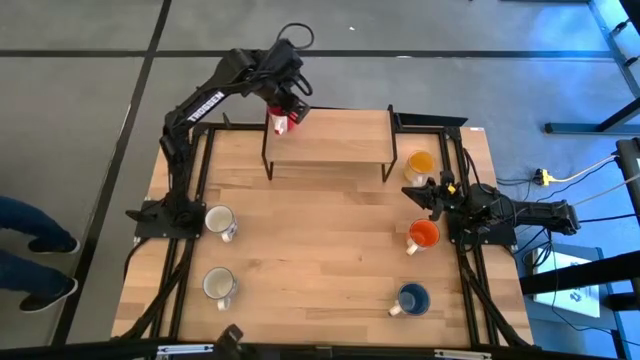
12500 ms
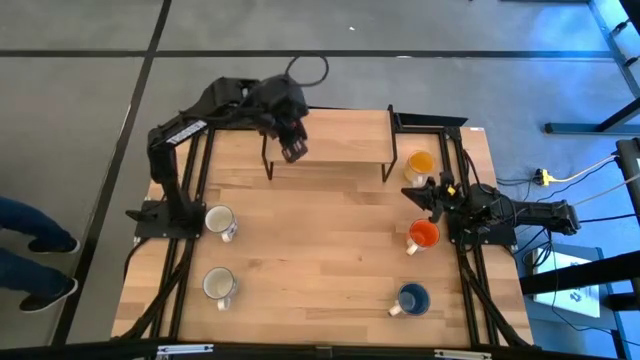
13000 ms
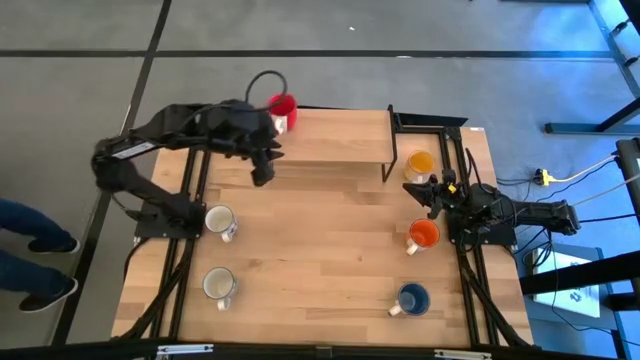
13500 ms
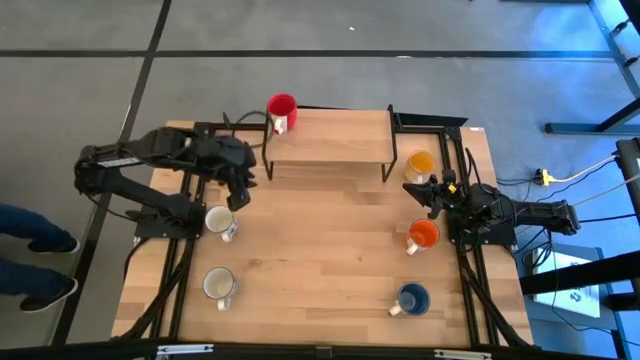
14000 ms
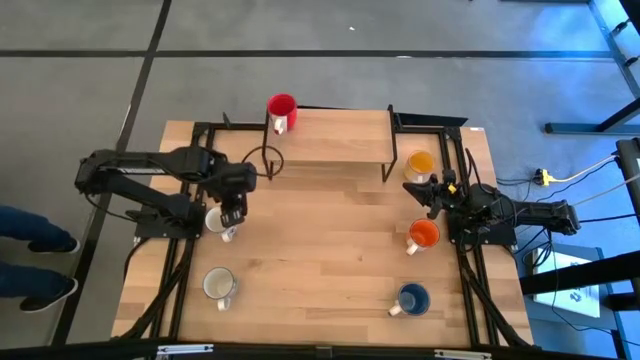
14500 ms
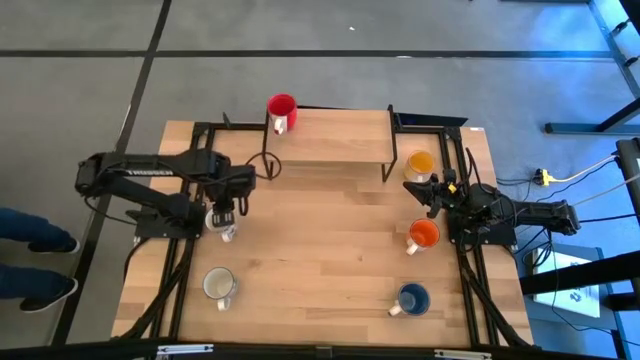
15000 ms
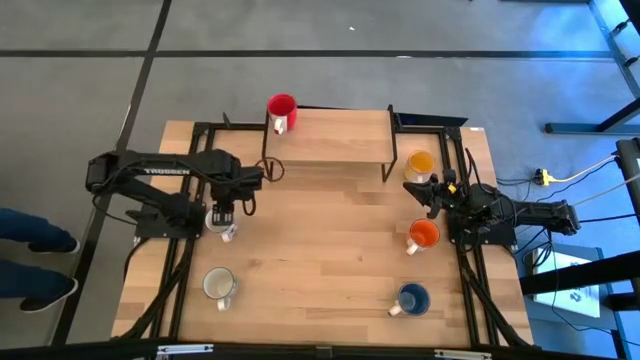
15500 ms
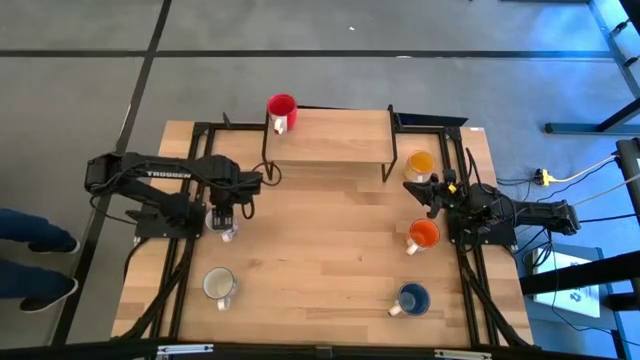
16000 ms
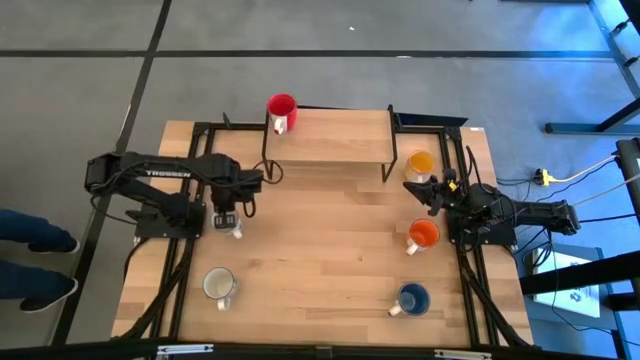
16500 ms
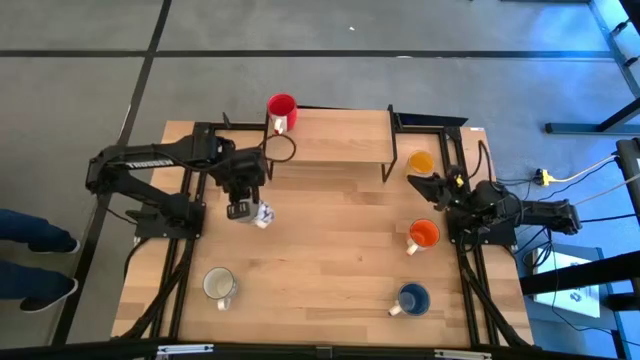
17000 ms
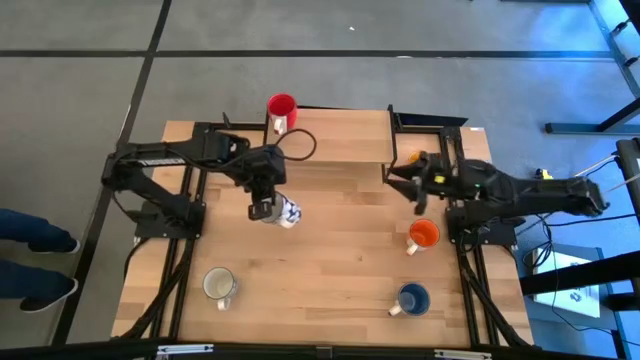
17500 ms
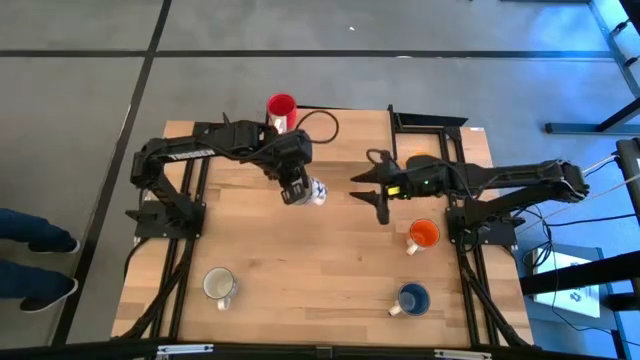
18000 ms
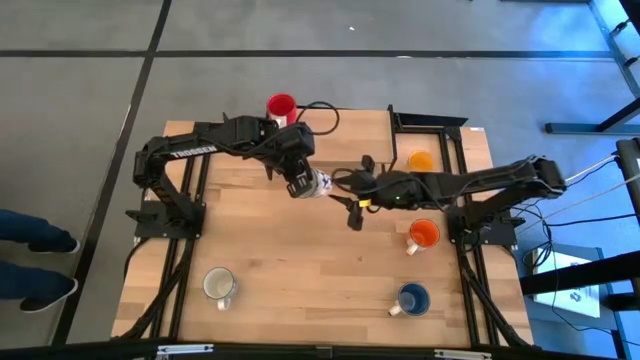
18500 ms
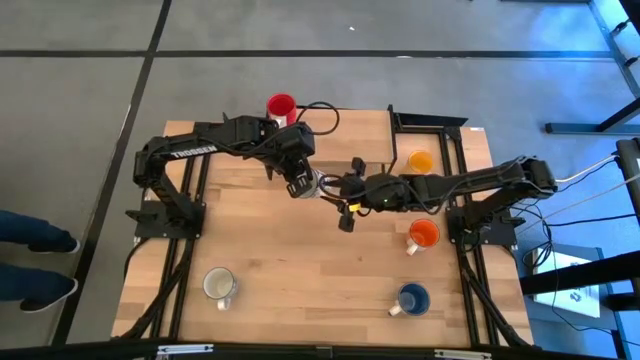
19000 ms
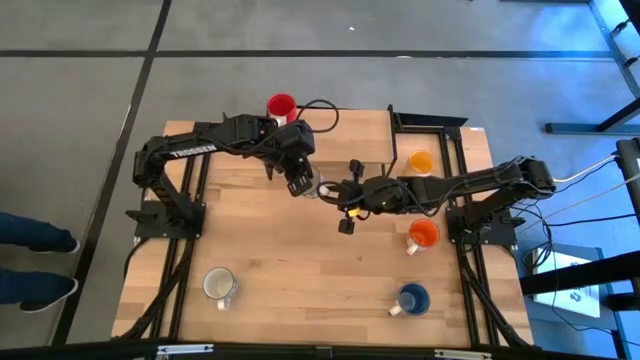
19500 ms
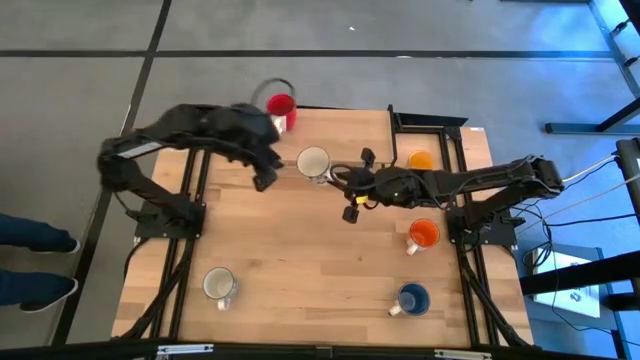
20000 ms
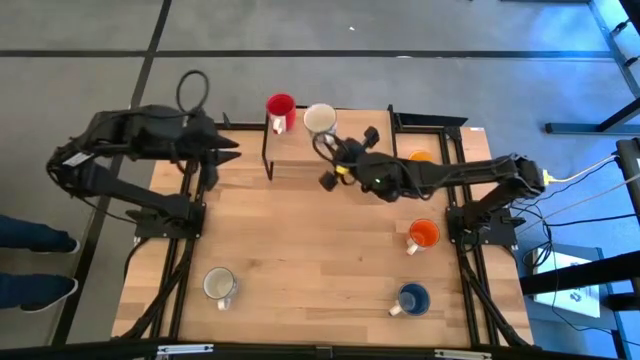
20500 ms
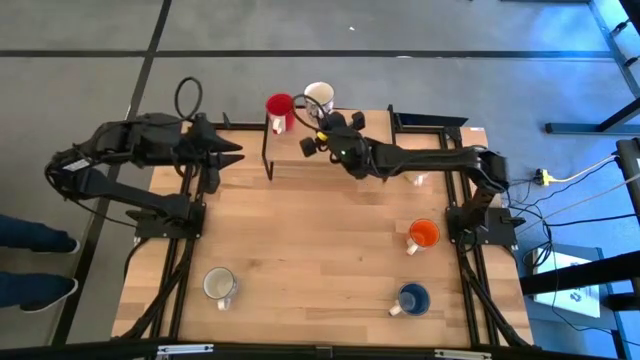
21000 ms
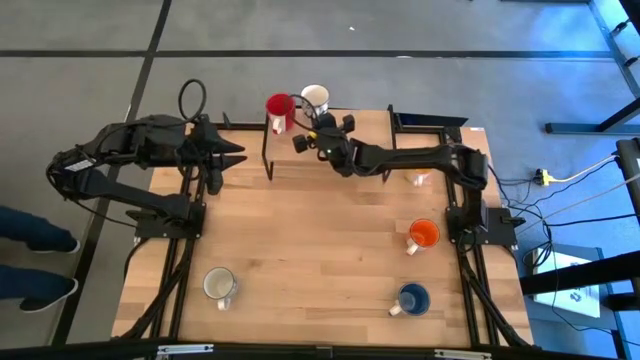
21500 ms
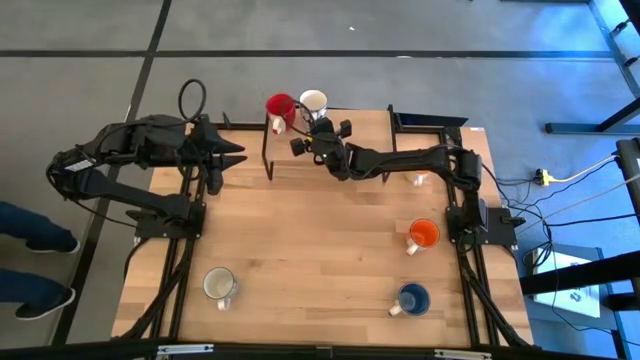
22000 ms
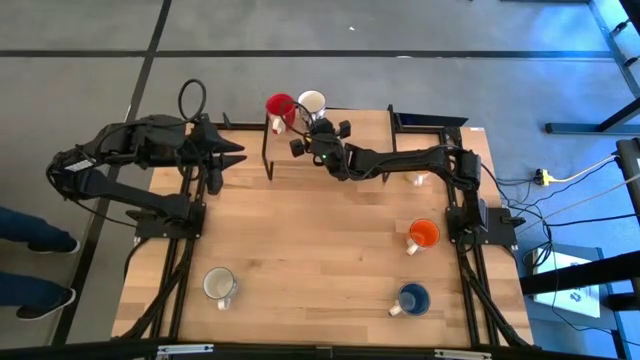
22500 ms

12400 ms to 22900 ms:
Task: Place coffee mugs
Put the top blue cup on the shelf

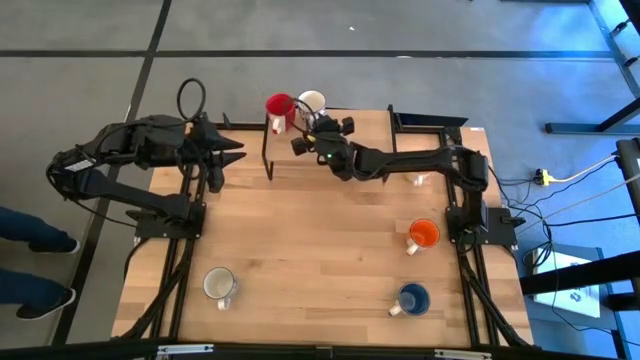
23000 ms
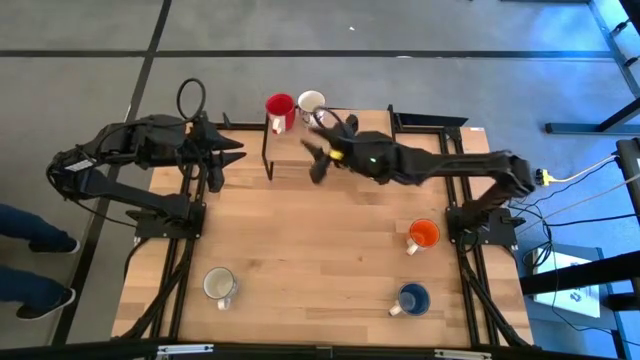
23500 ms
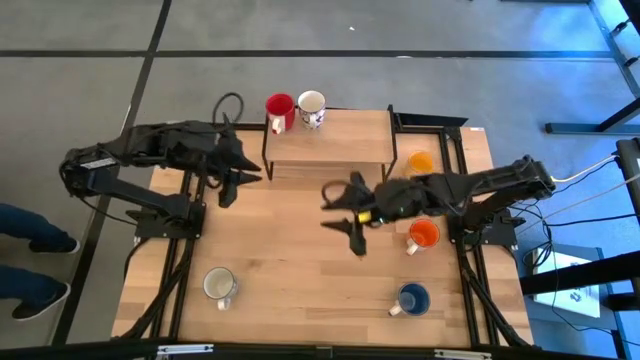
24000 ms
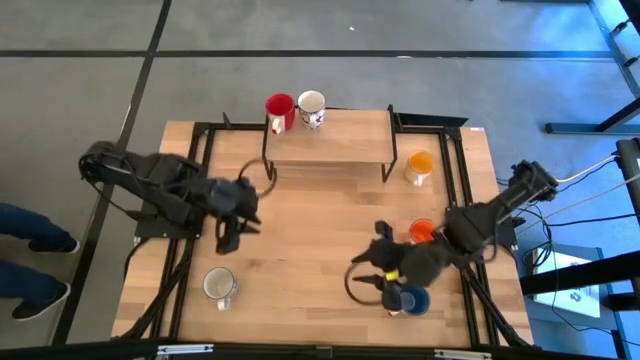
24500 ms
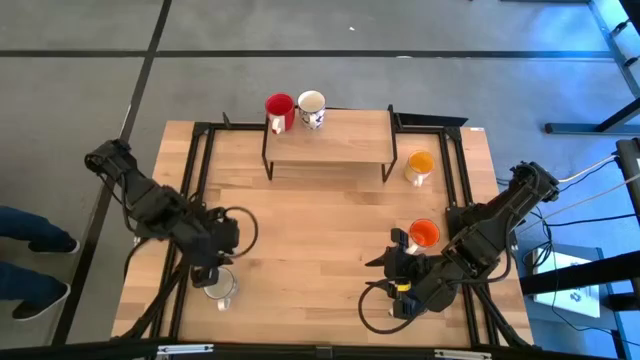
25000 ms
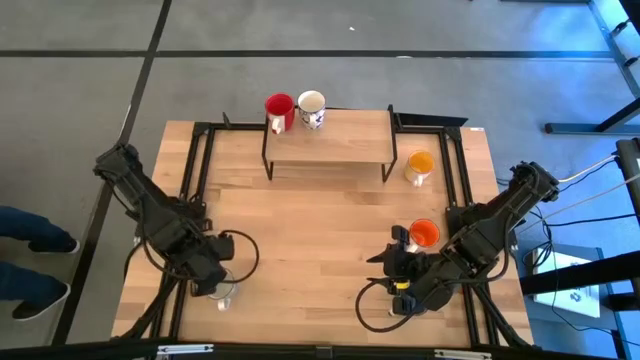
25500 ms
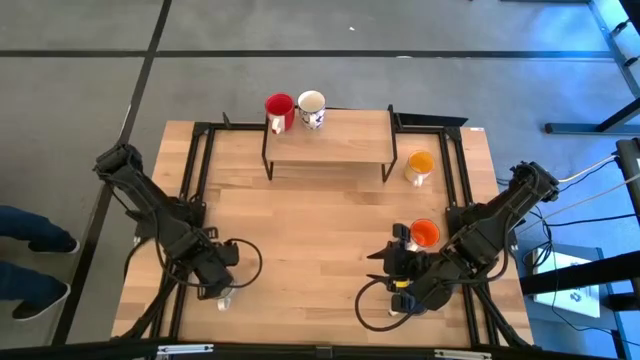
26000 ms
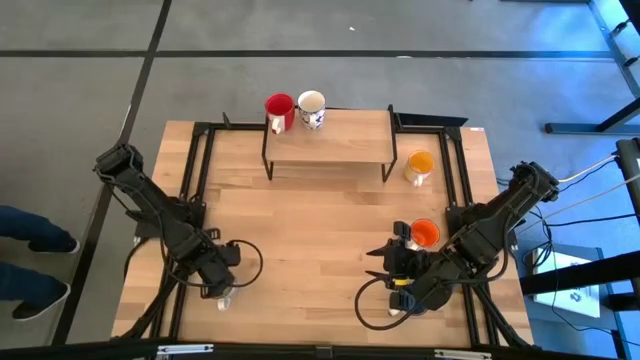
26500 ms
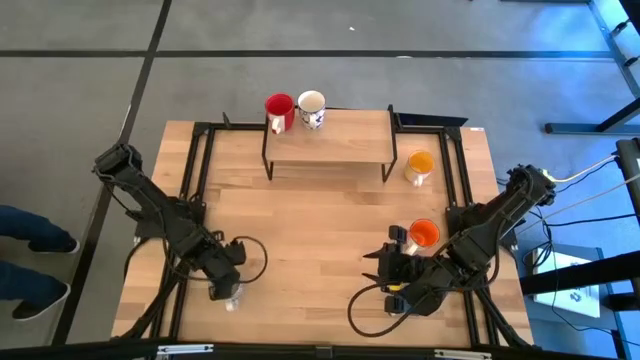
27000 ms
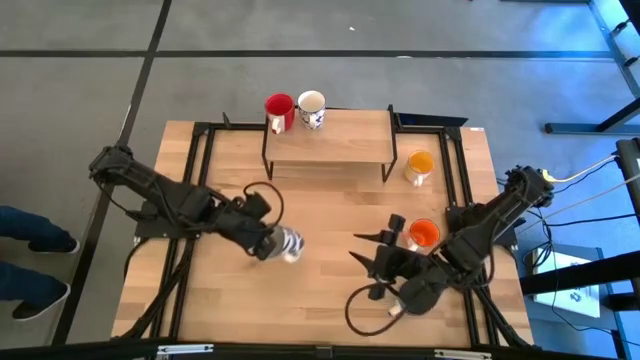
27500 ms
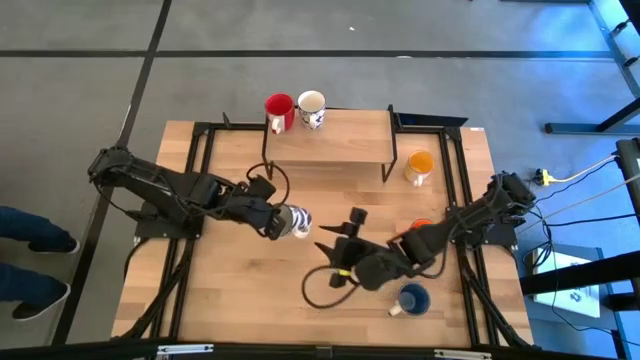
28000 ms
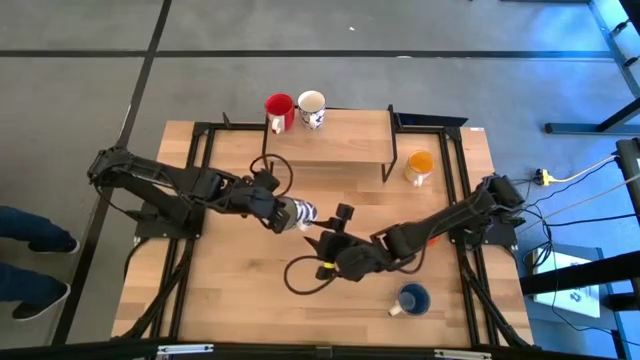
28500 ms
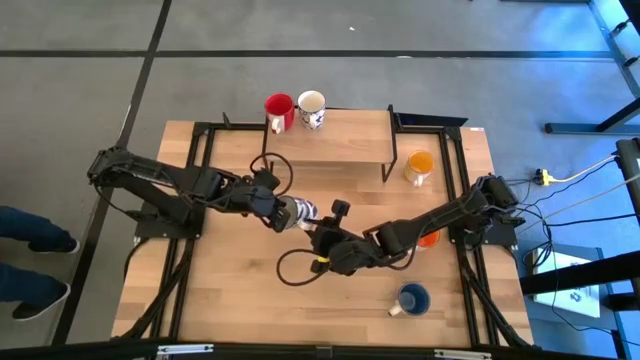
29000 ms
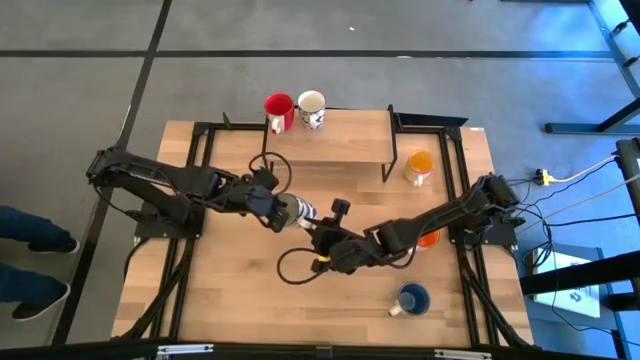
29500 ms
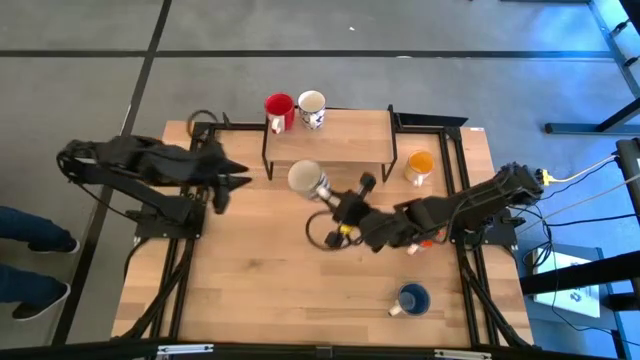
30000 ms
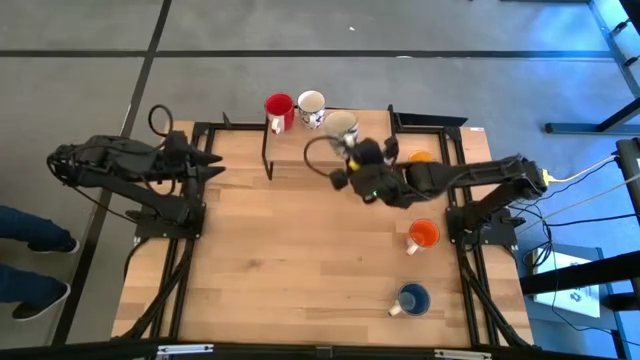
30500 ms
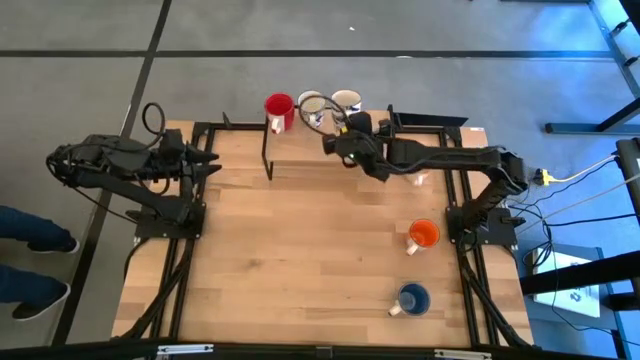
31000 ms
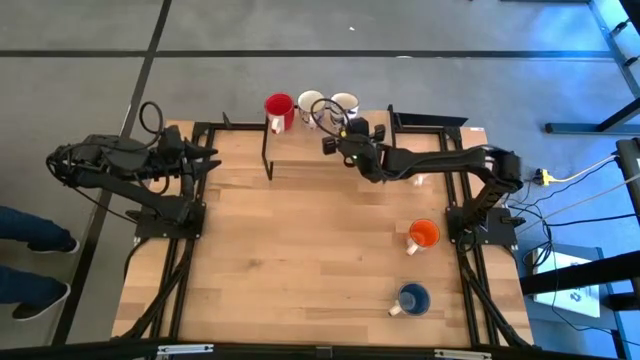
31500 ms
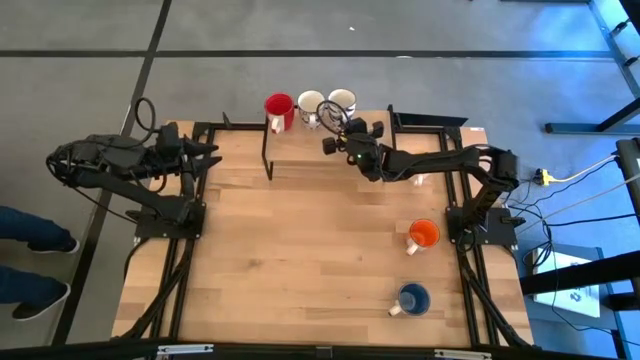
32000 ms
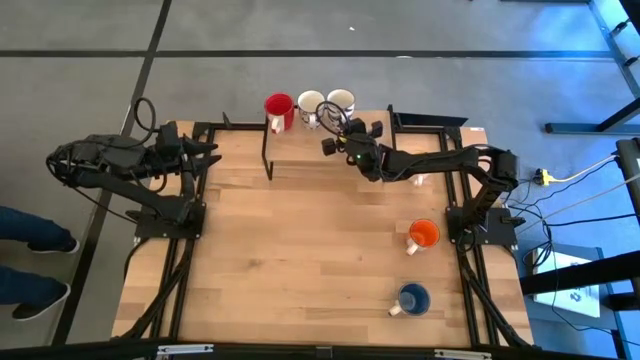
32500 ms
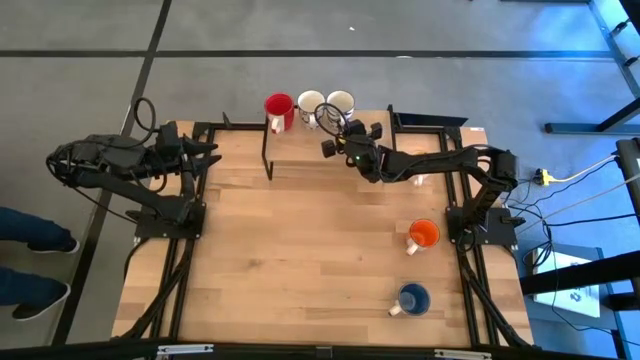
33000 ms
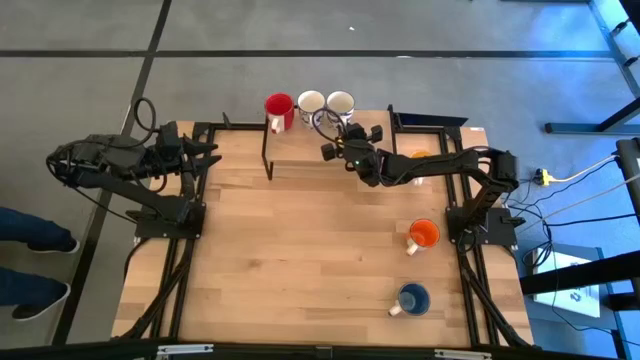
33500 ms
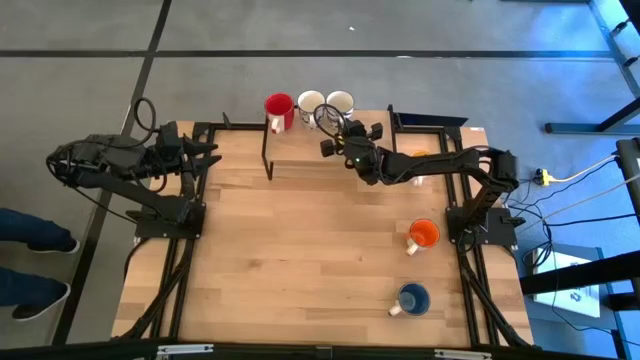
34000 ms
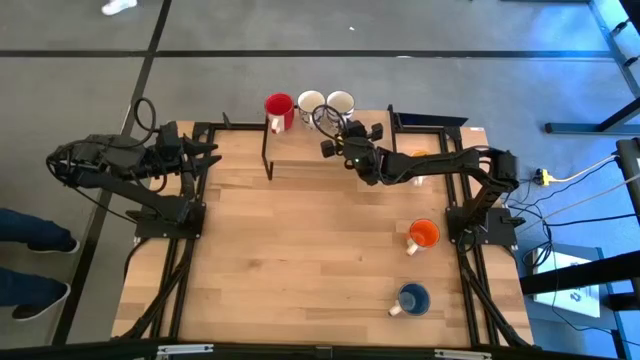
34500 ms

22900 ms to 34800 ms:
Put the blue cup on the shelf
